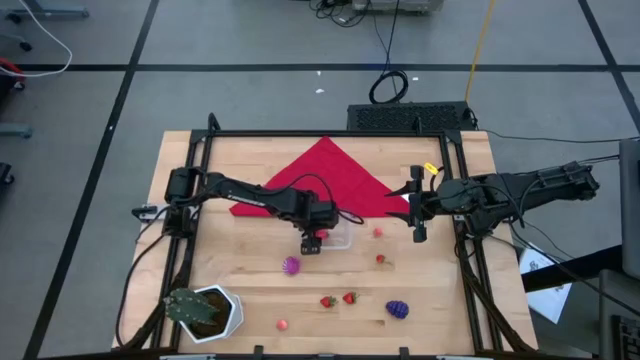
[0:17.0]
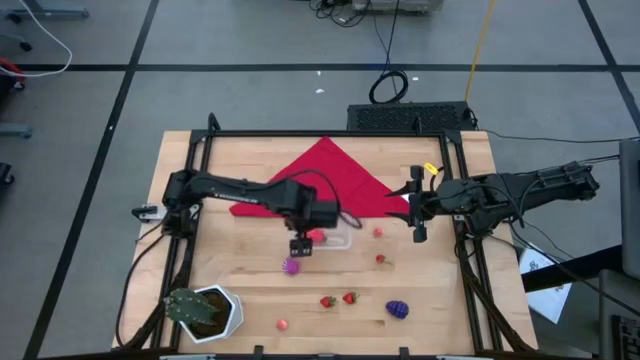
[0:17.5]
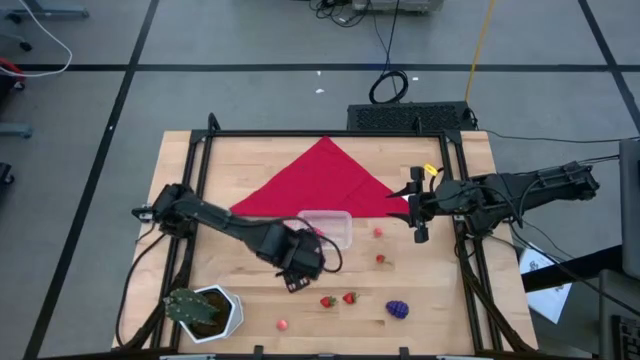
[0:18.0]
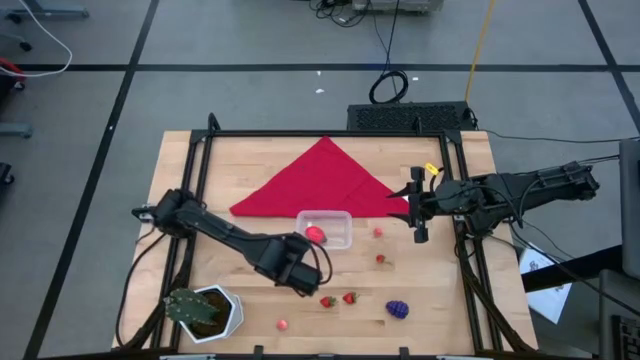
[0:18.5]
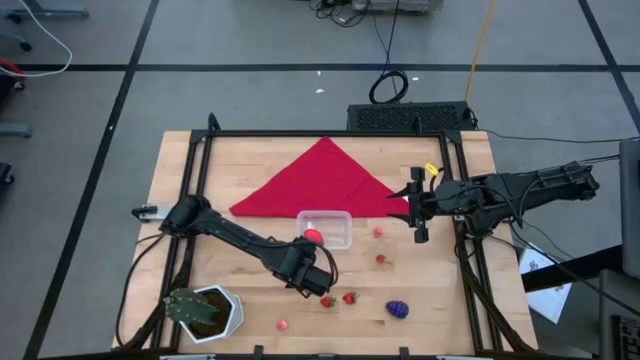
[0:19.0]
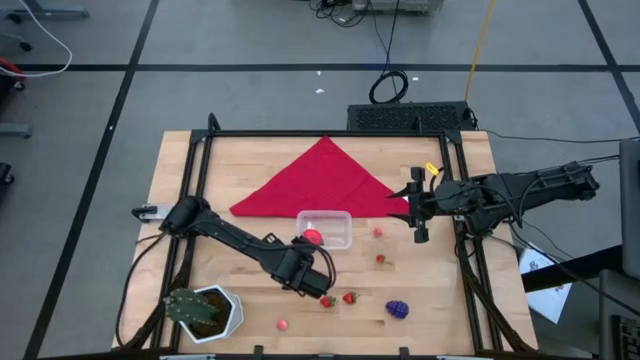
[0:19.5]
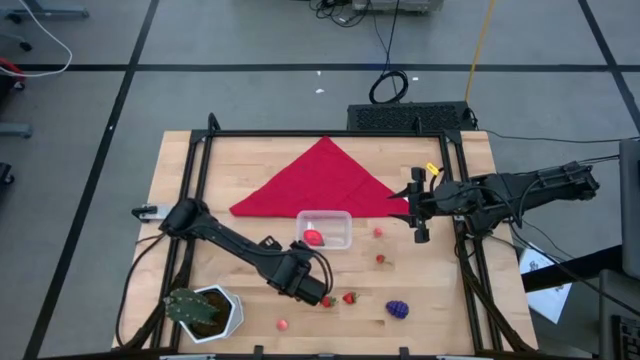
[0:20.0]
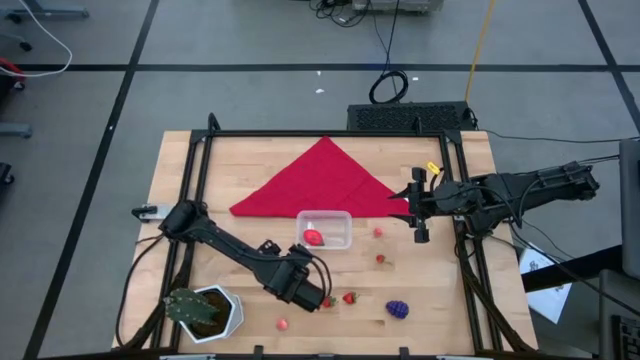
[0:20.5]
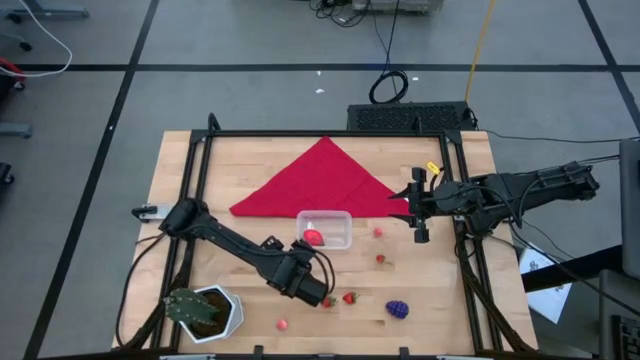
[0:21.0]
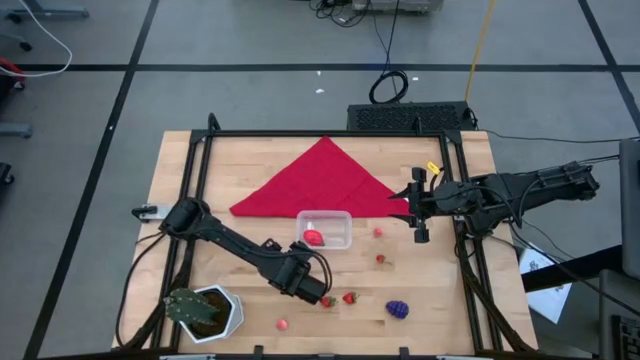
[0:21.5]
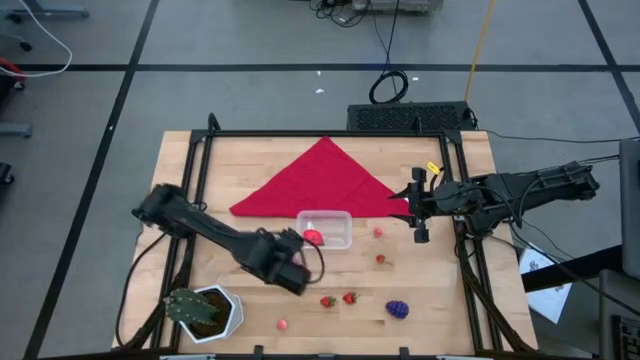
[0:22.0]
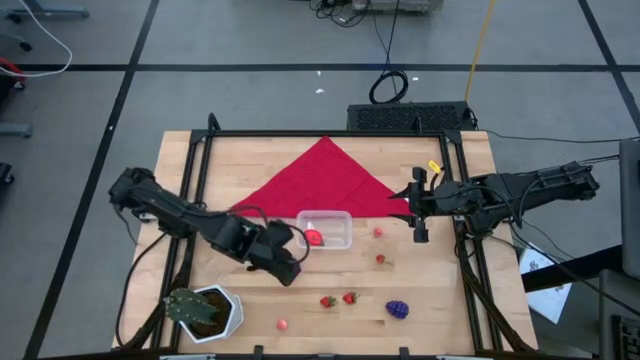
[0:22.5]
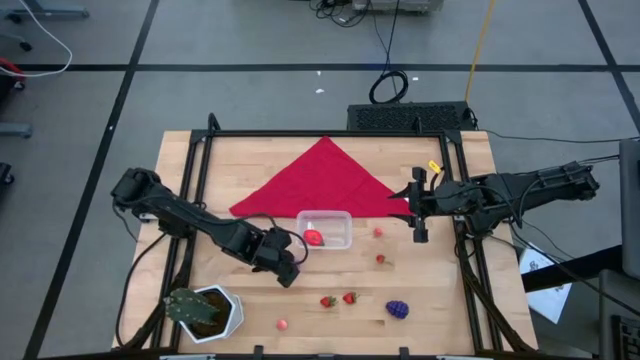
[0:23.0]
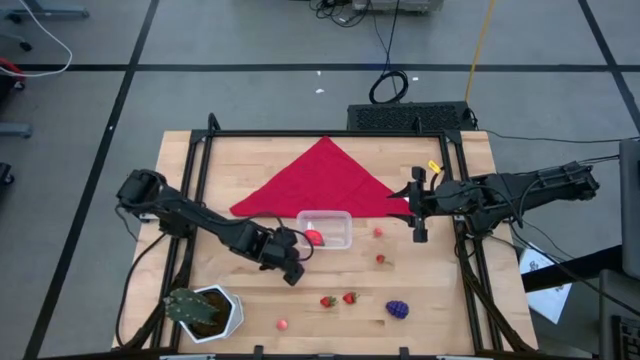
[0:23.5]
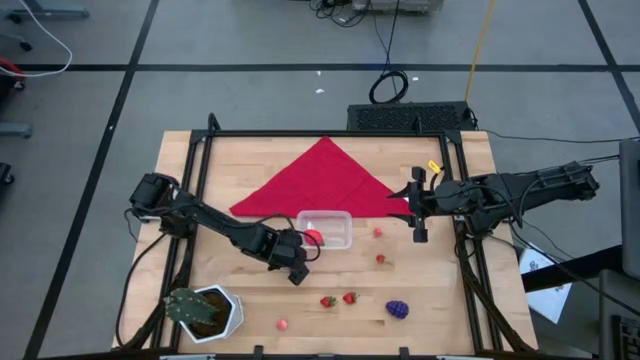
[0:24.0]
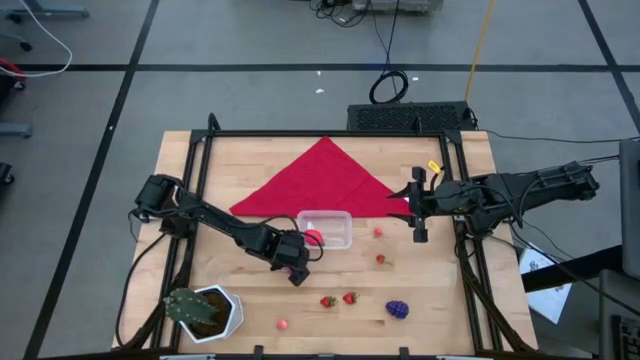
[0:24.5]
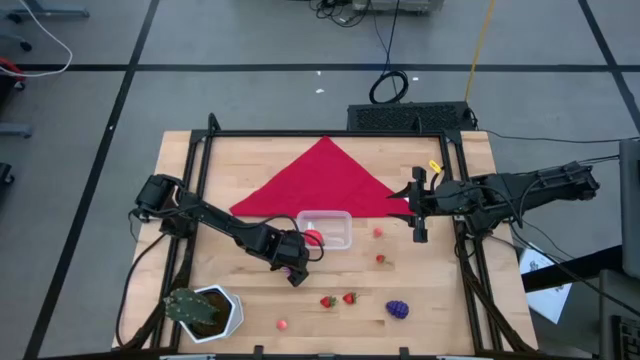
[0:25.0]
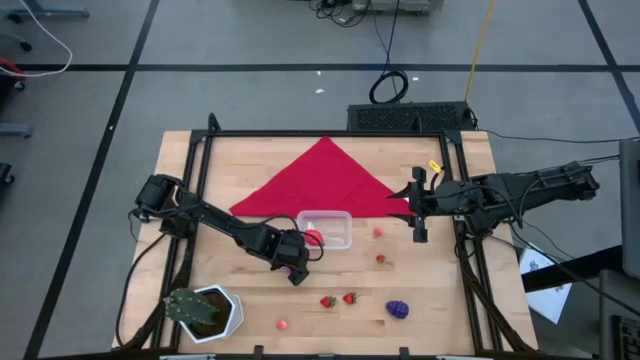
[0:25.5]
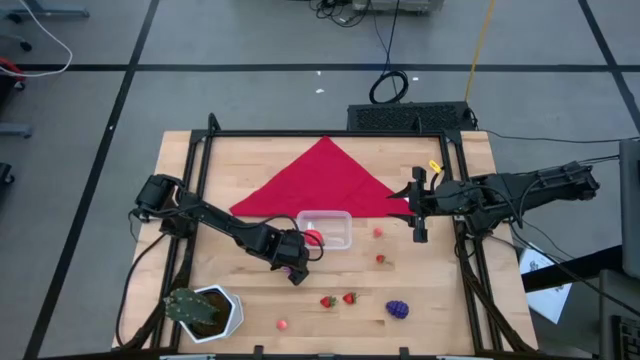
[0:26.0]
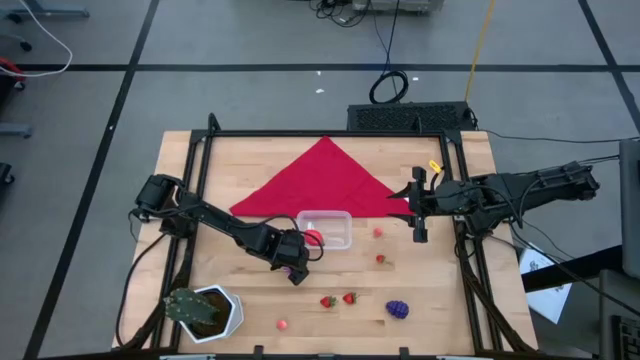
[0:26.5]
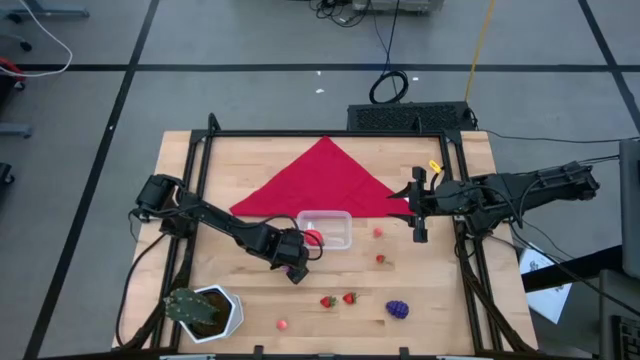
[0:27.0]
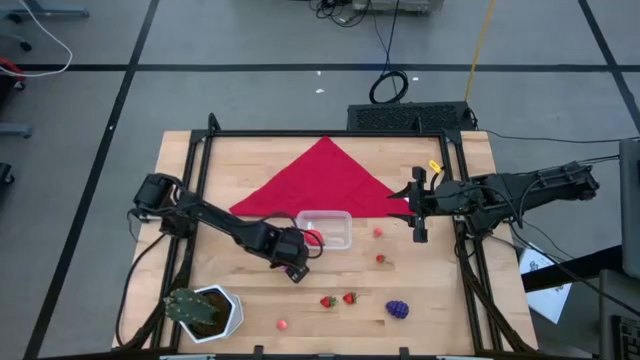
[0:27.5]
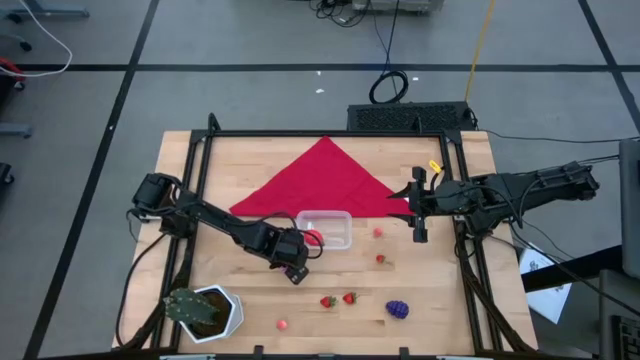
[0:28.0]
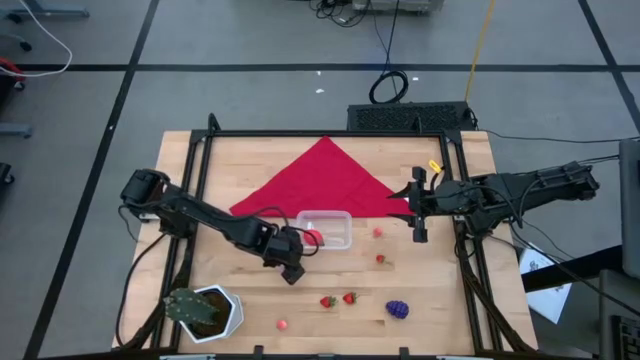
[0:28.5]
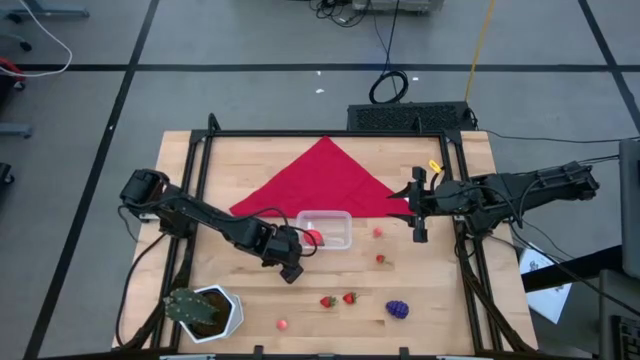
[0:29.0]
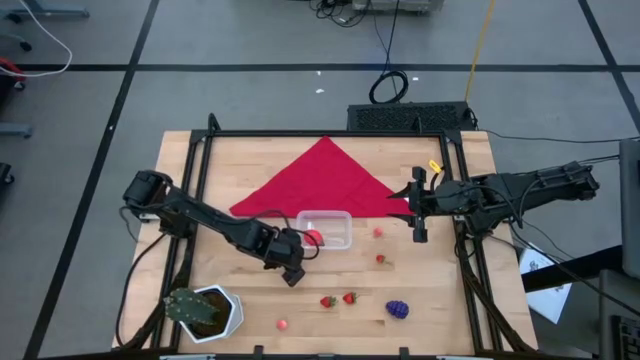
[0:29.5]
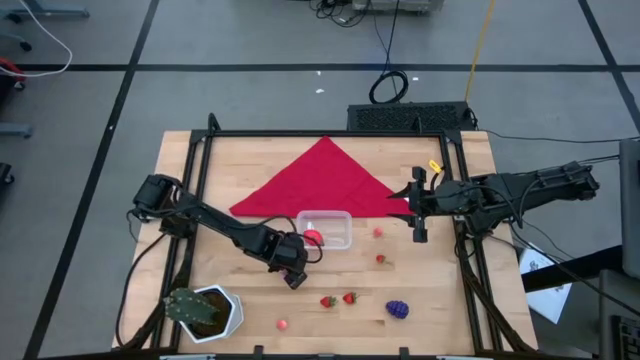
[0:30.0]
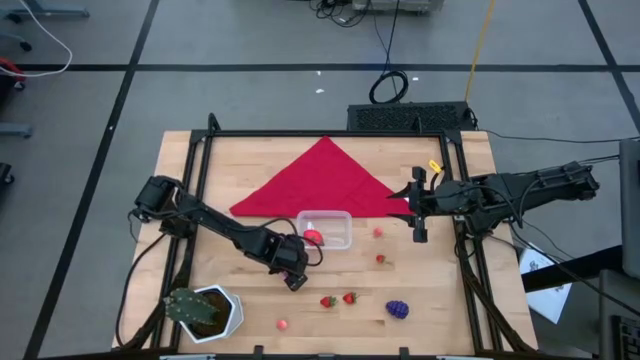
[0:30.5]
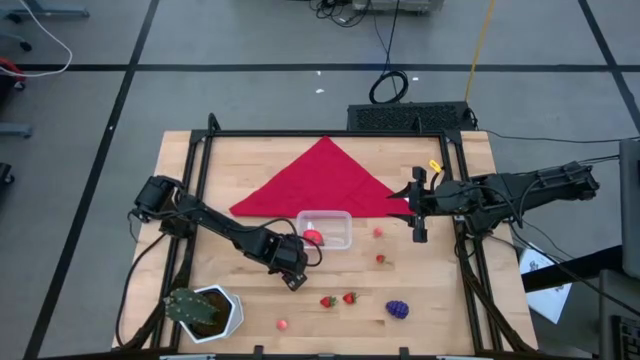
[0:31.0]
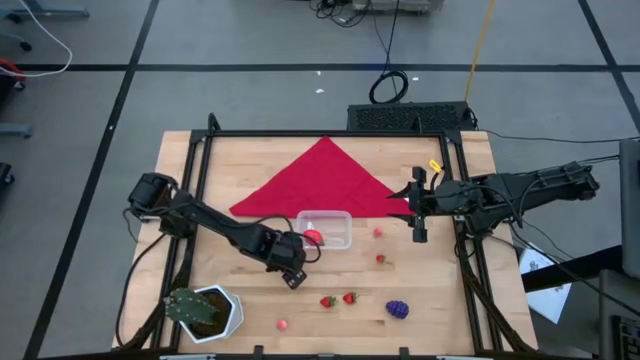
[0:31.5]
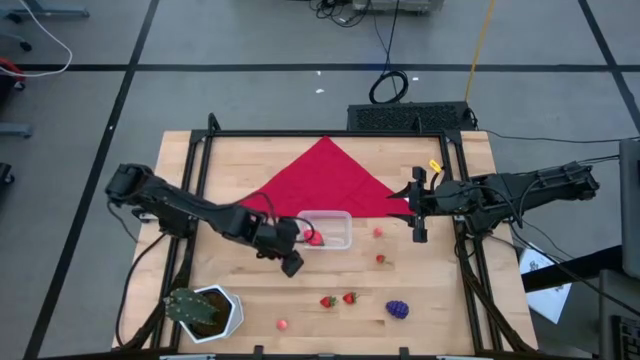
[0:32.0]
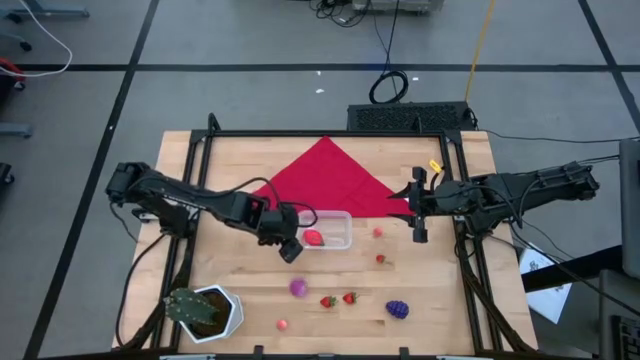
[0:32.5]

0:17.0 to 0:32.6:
Task: Pick and placing Produce into tupperware
Put the red onion in the transparent bin

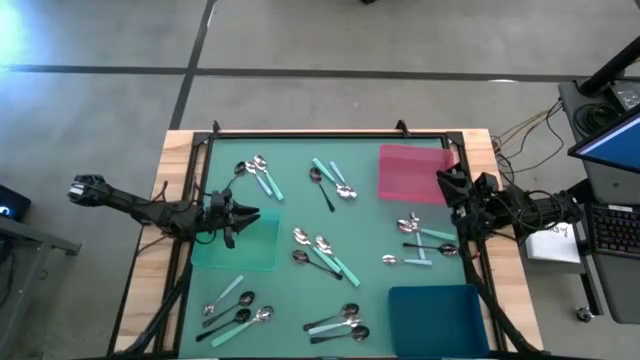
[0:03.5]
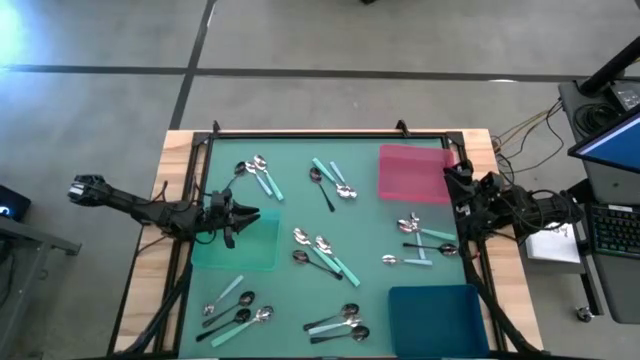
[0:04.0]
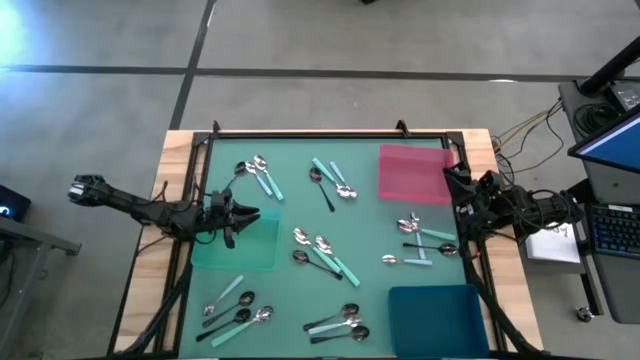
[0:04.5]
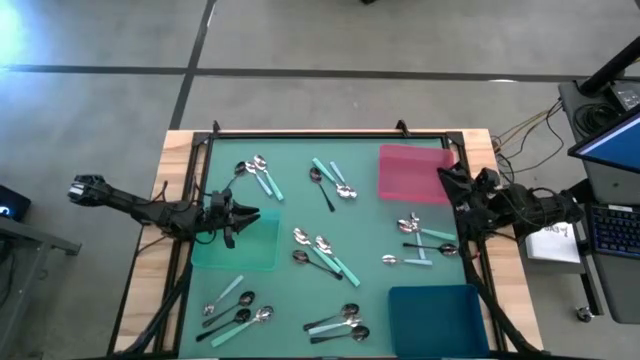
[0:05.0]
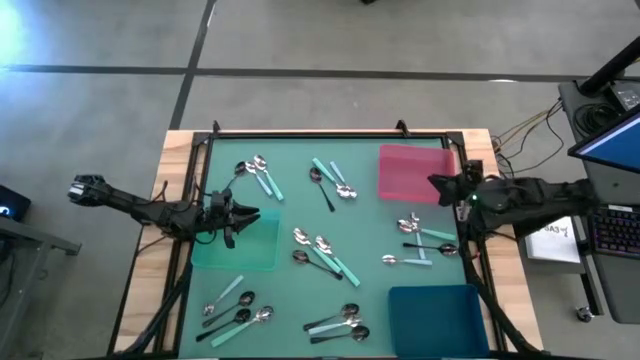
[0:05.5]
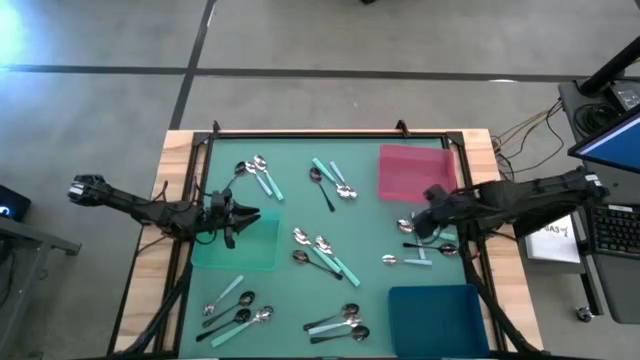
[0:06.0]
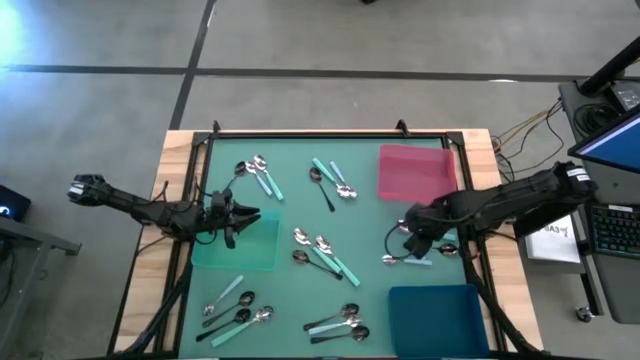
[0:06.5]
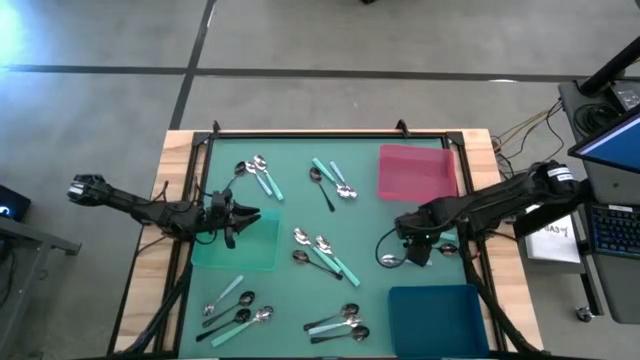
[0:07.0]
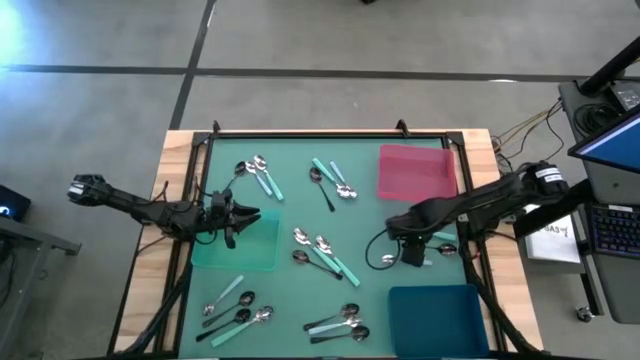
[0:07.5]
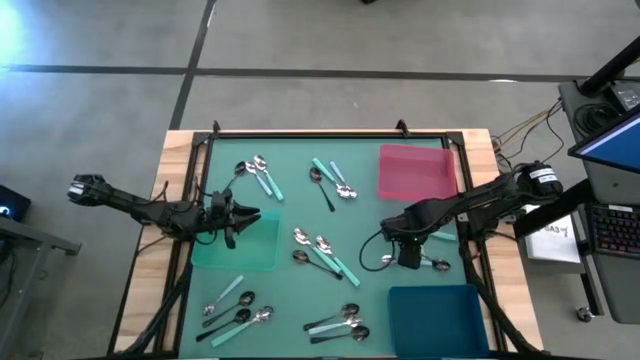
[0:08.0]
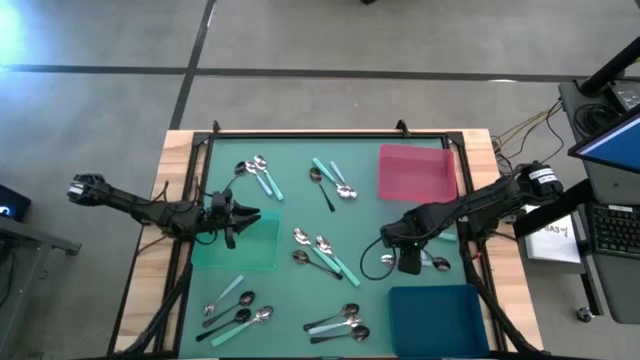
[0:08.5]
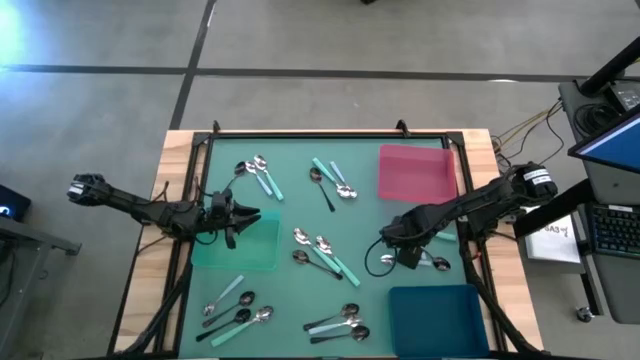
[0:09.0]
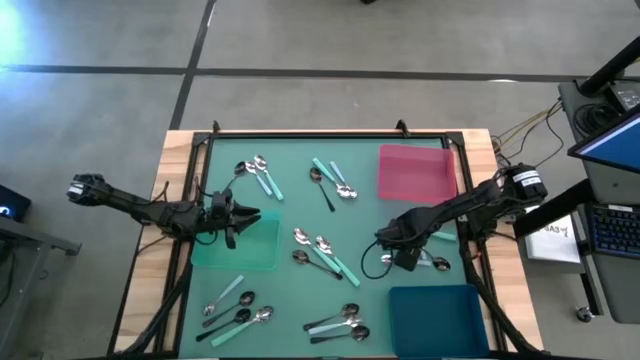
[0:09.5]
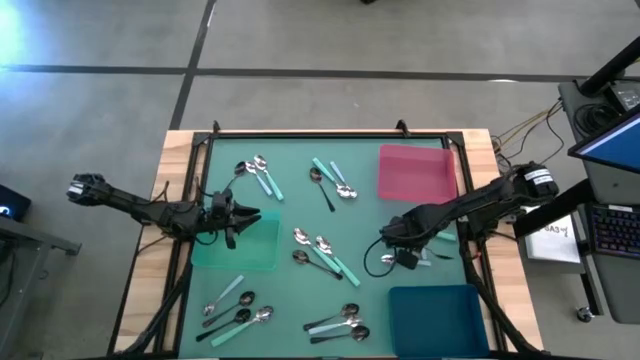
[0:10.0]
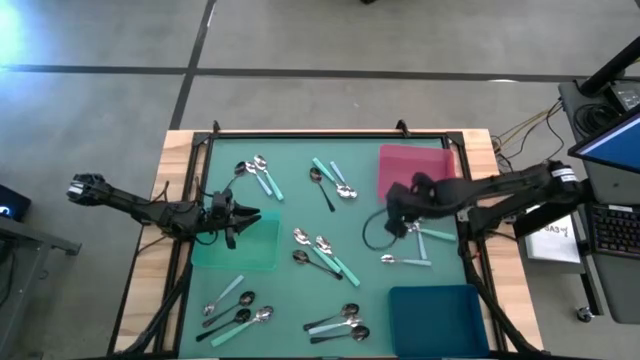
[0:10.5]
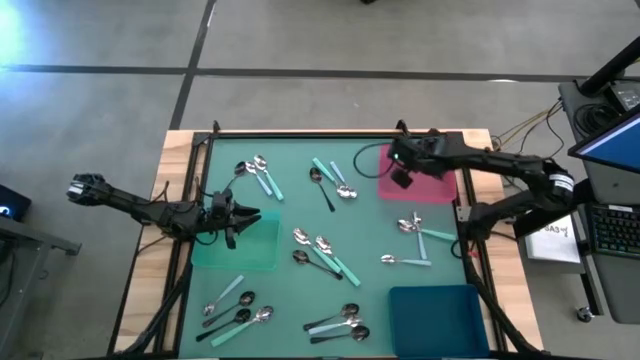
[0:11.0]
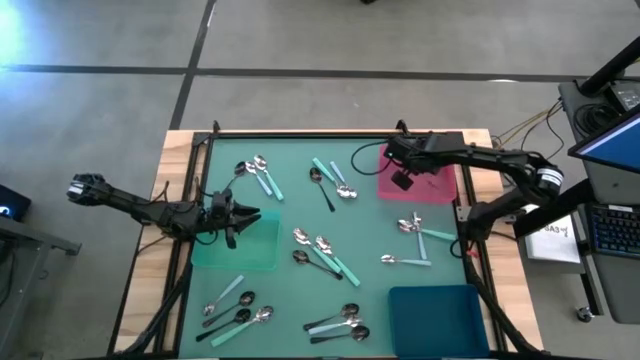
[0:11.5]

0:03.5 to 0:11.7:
Task: Sort silverware by color (type)
Put the black spoon into the red bin
